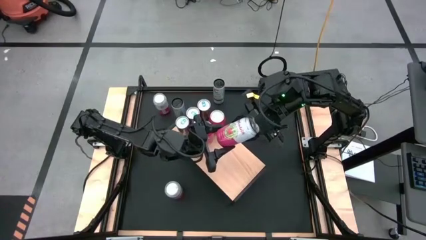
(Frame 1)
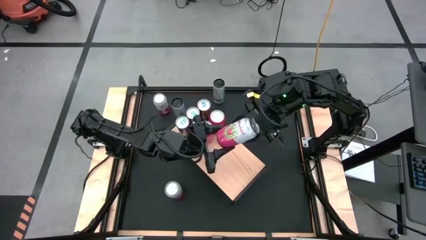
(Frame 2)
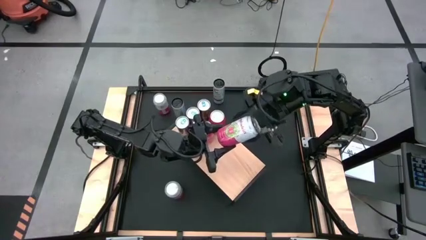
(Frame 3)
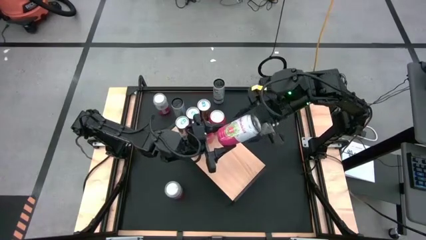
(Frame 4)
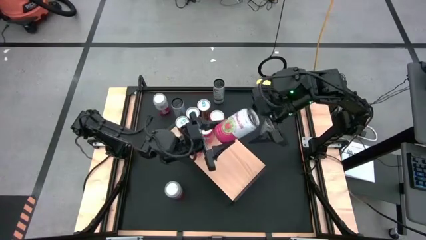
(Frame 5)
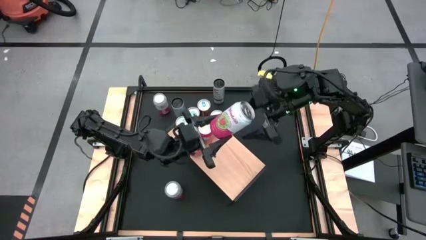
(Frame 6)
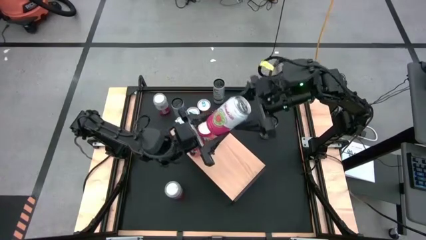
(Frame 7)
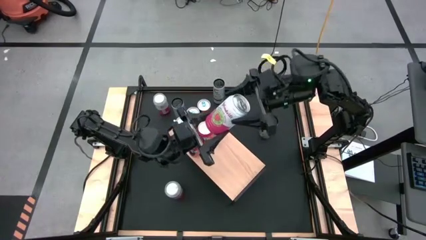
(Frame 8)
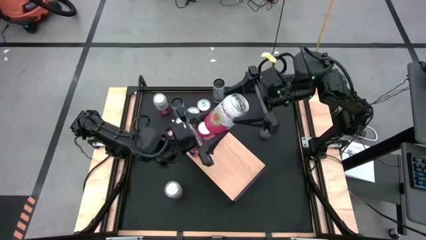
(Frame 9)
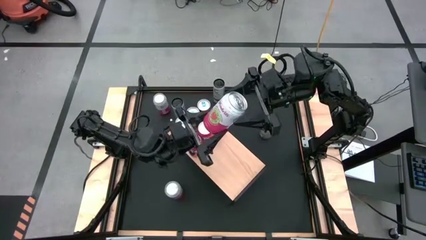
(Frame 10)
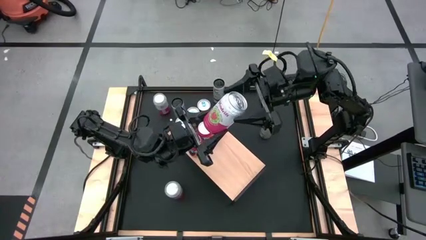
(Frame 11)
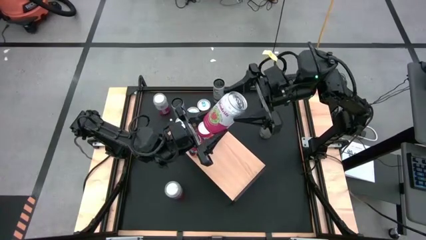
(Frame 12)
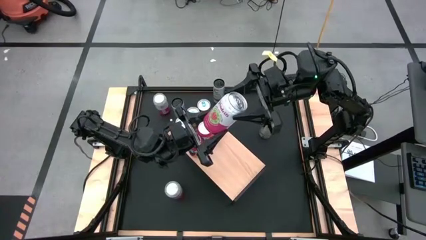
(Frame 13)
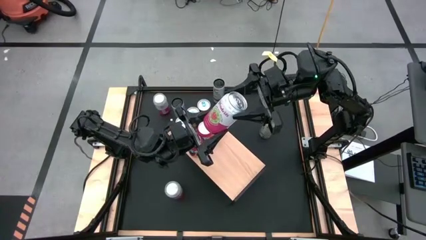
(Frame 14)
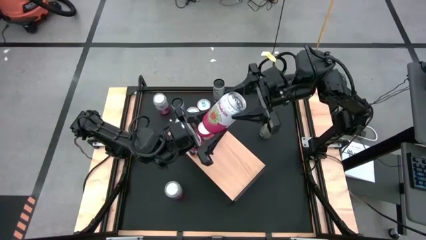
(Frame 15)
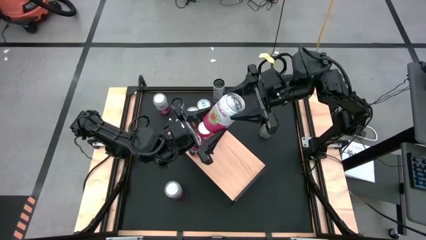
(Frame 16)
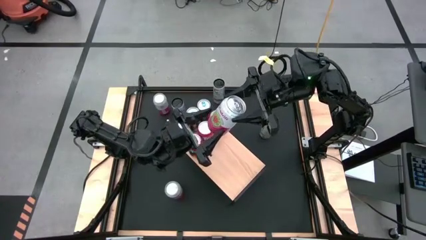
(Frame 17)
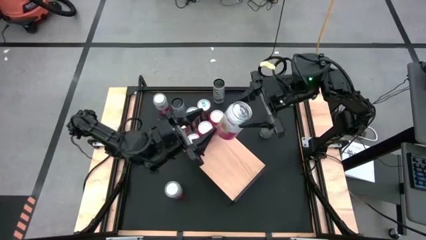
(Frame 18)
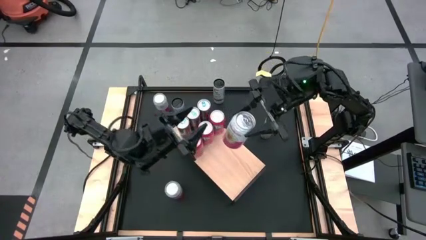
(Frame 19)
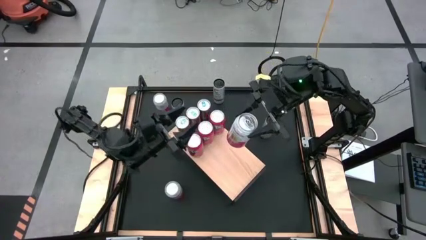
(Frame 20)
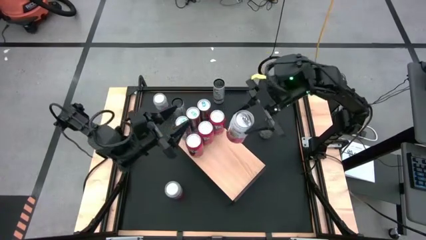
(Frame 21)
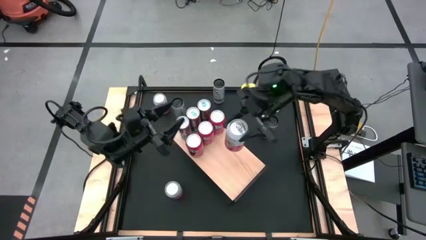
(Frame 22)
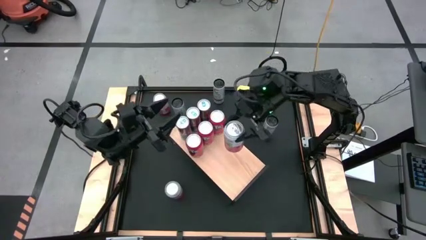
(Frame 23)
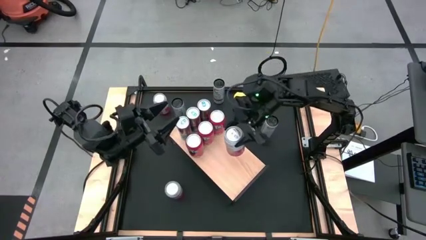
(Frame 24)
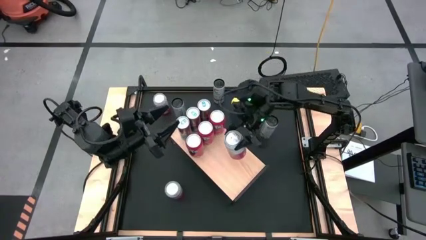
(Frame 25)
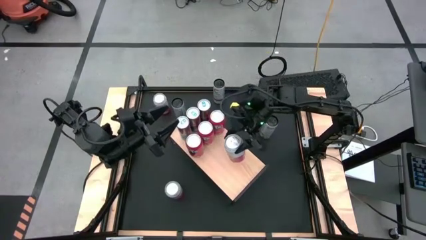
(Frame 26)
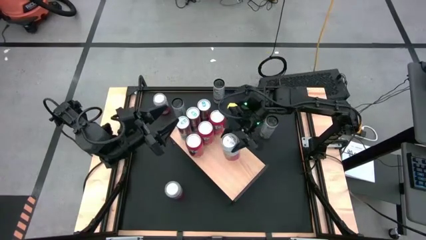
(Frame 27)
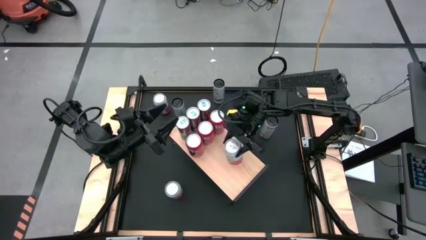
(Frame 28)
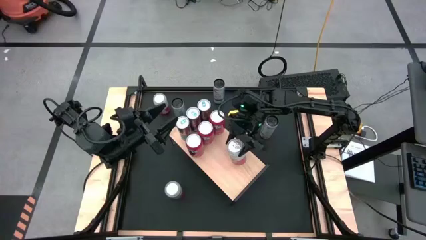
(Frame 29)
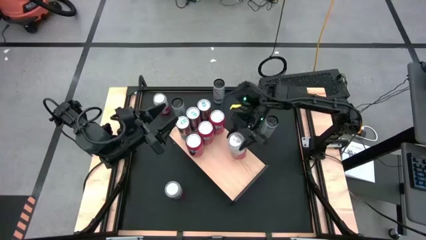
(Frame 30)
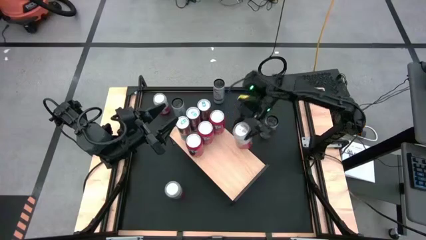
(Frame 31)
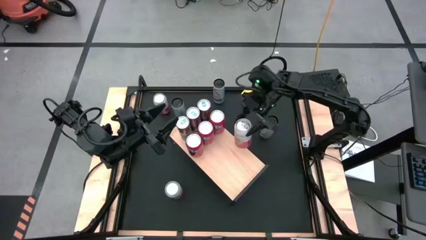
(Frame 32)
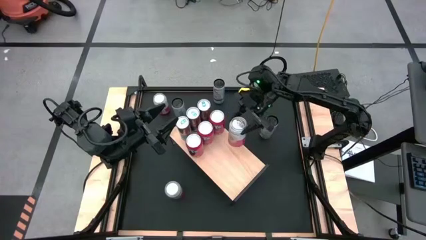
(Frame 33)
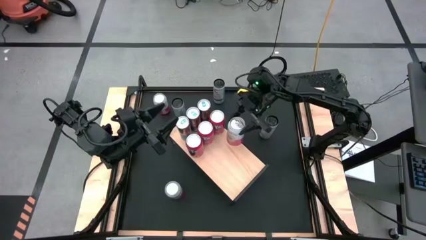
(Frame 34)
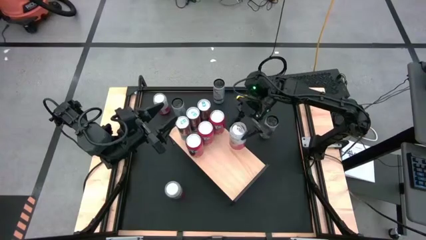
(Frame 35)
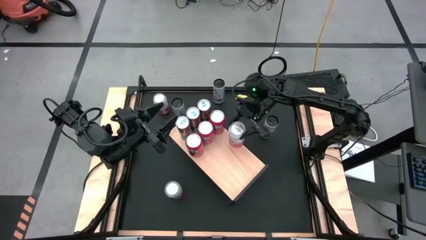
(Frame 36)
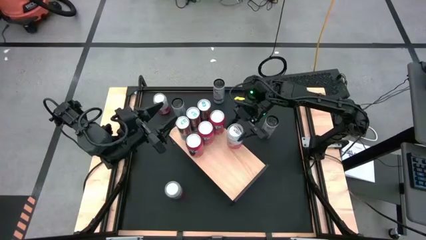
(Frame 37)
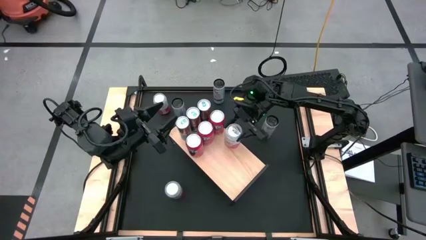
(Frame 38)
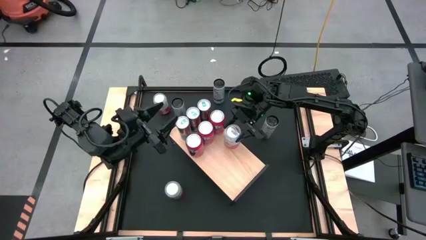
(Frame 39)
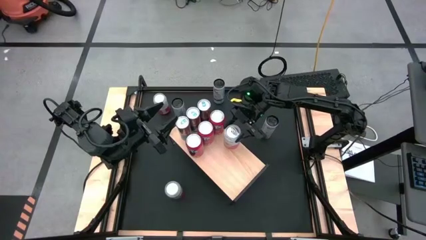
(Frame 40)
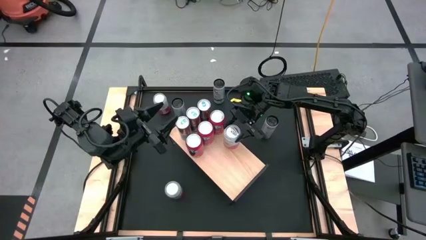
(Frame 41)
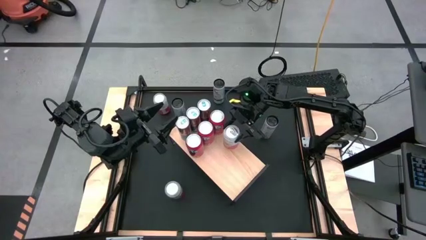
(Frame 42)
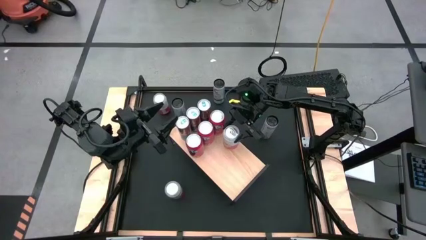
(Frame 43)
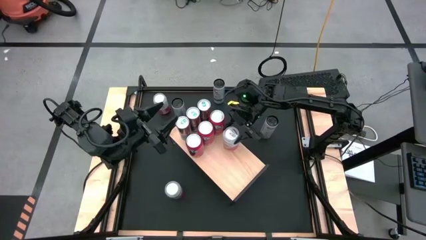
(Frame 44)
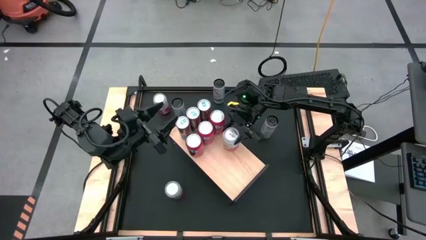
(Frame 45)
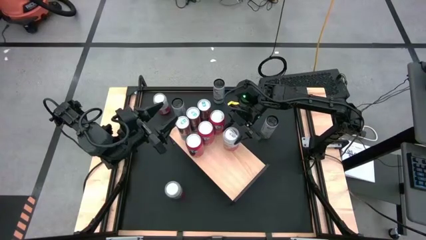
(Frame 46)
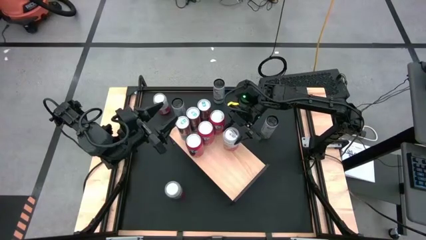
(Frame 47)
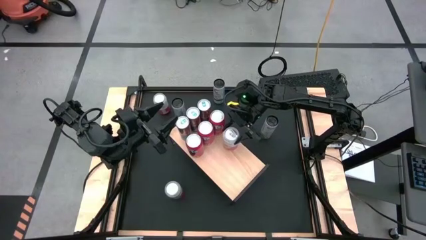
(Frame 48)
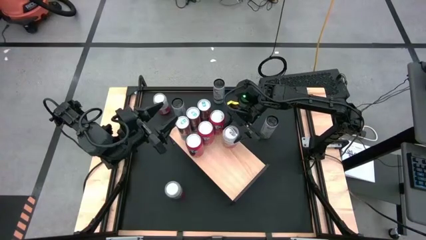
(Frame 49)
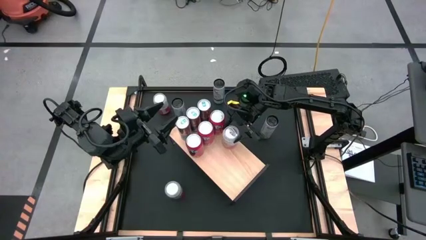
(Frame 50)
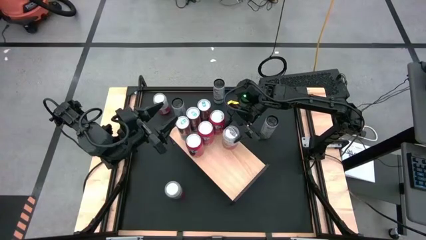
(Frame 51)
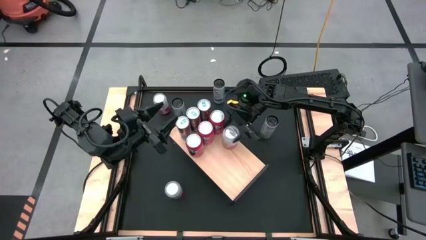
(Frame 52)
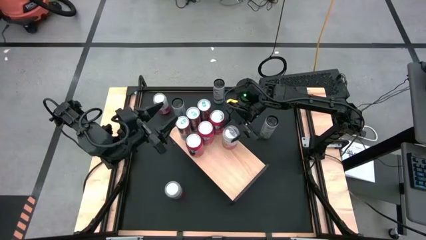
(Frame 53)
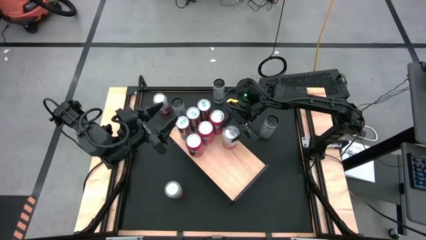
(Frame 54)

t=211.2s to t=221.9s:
Task: Place canned beverage on shelf
Put the right pink soda can on the shelf

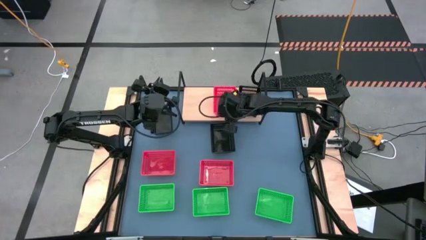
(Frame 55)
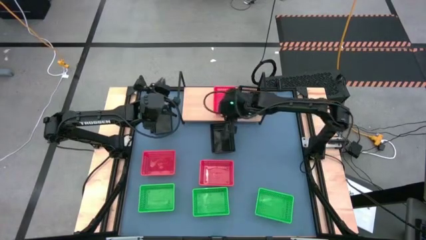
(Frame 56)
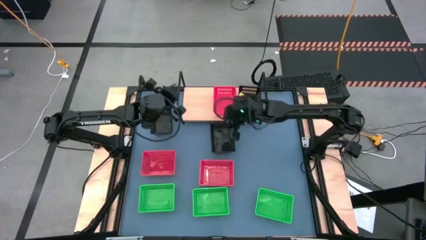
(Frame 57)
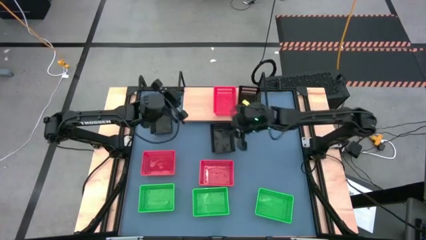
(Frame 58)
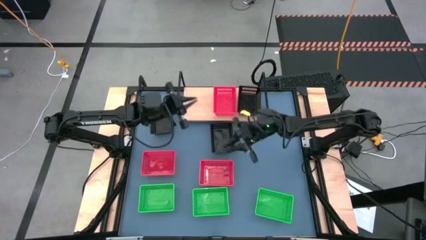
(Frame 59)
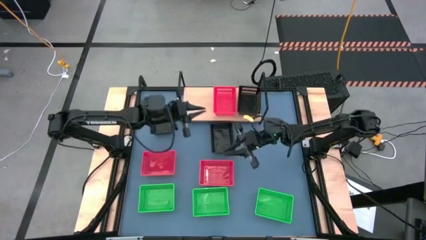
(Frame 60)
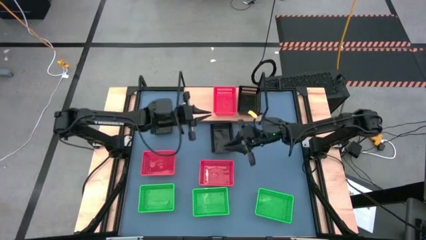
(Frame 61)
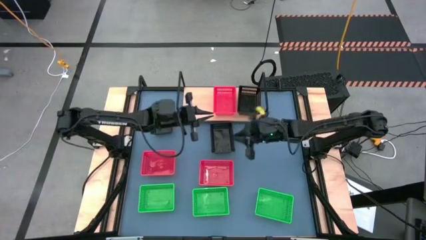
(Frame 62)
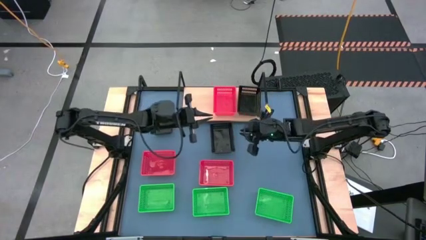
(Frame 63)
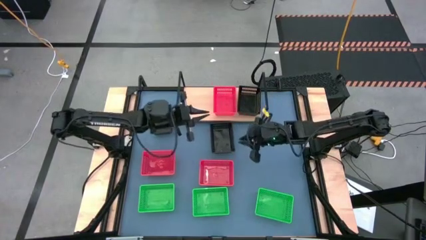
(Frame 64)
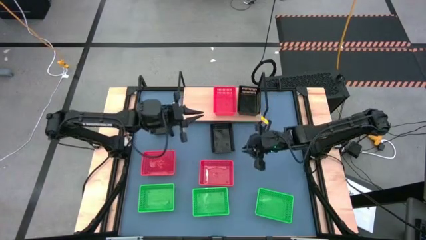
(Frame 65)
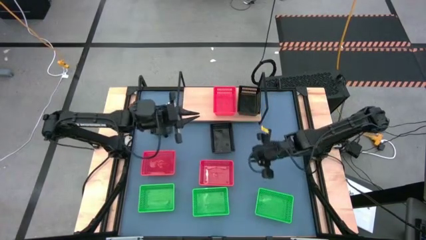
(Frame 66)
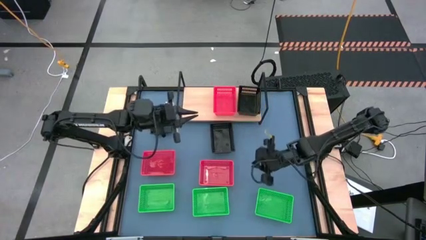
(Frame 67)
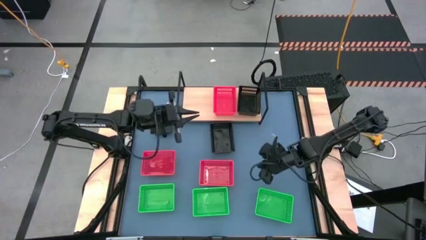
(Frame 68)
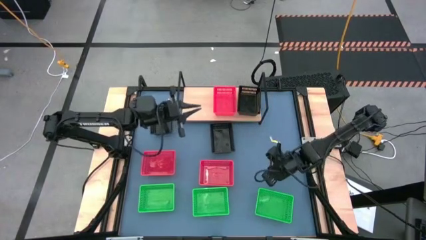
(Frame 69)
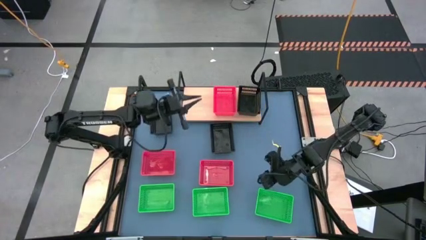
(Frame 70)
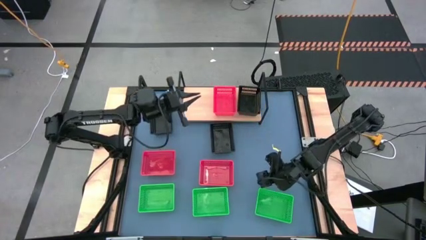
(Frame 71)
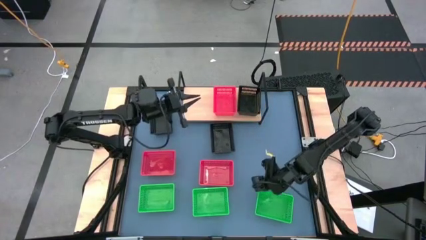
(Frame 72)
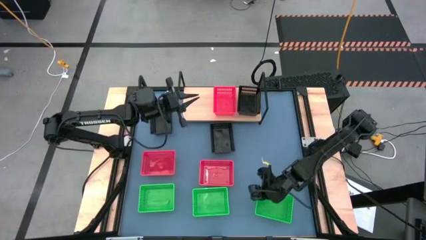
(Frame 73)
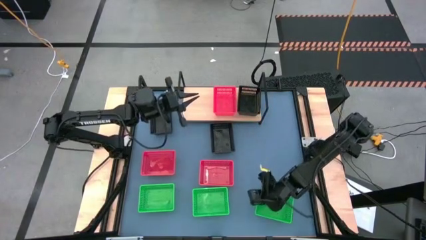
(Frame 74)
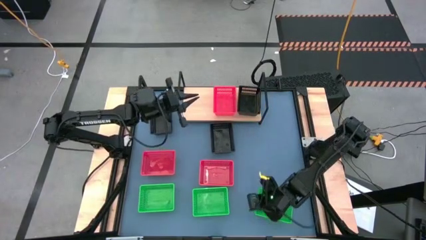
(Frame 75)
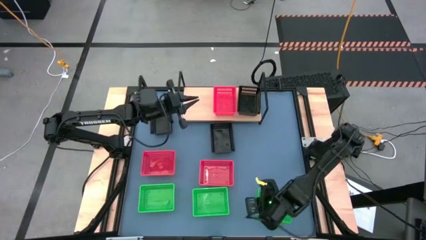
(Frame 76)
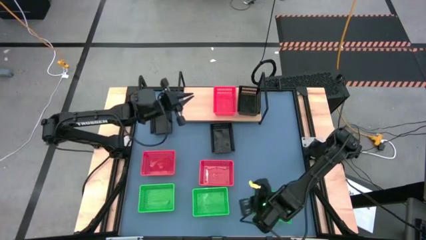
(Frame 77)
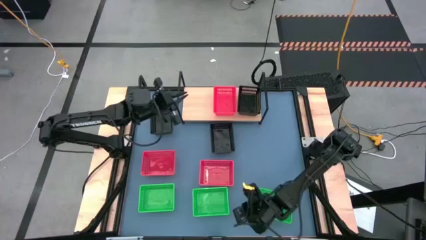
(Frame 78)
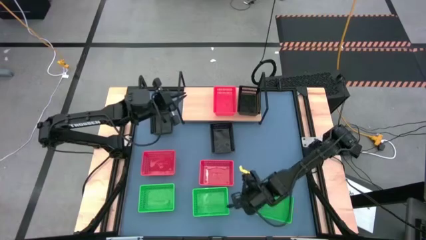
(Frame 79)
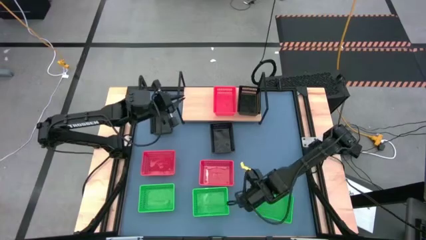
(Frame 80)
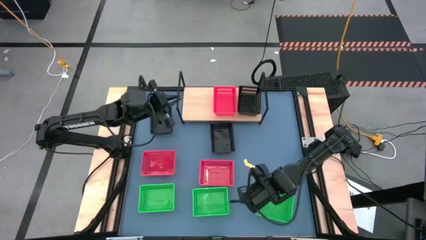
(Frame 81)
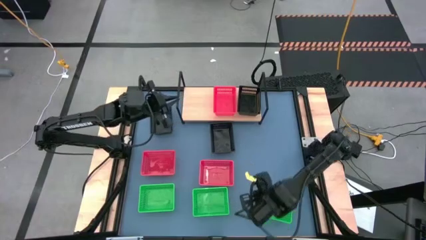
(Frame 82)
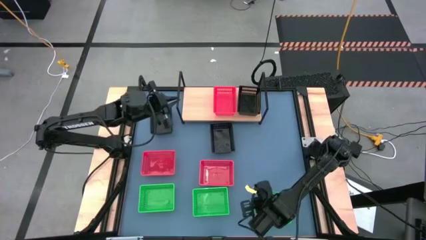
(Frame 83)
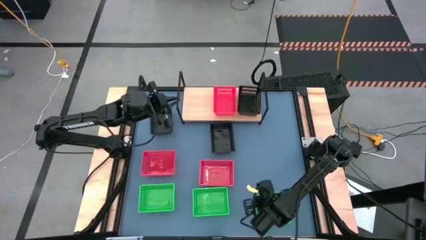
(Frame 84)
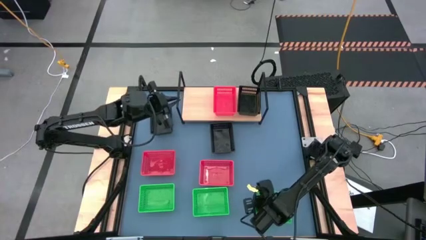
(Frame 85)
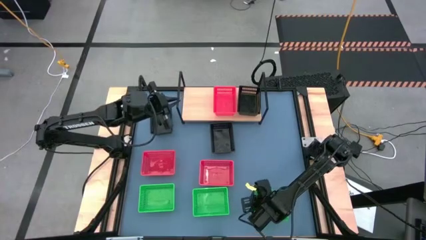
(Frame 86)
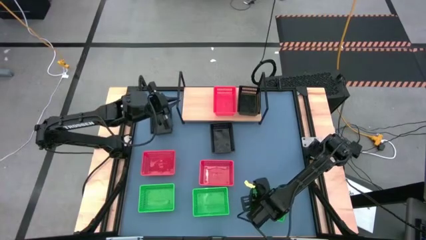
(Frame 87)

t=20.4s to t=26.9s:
Task: Stack baskets on shelf by color
Put the right green bin on the shelf
